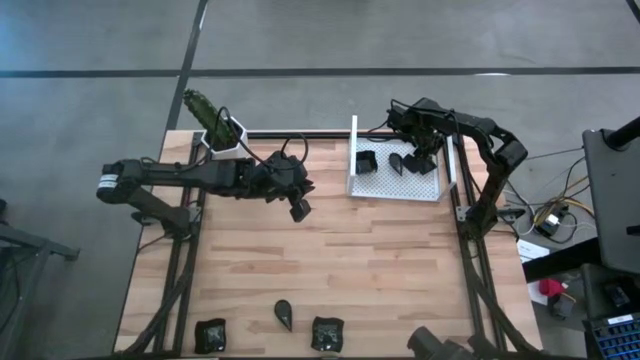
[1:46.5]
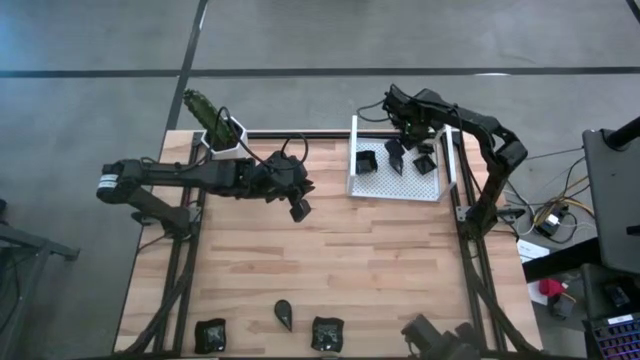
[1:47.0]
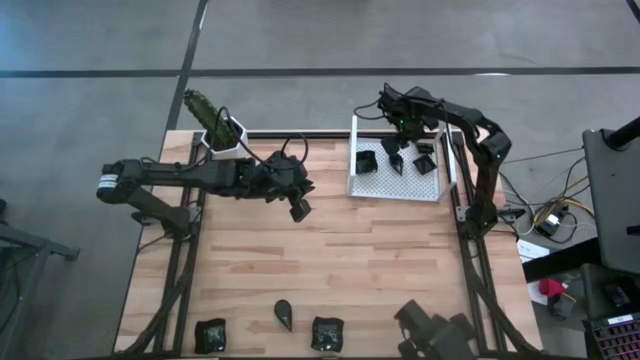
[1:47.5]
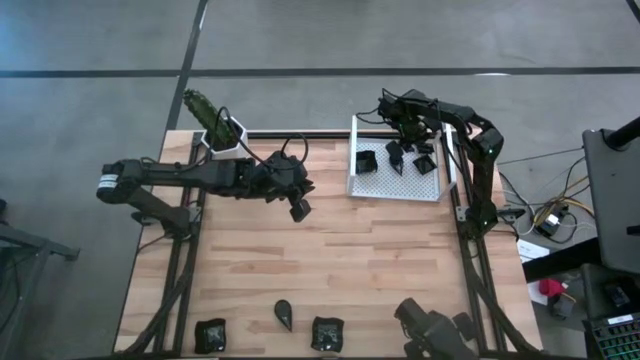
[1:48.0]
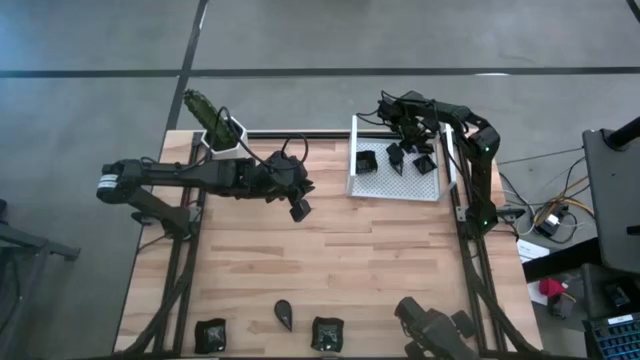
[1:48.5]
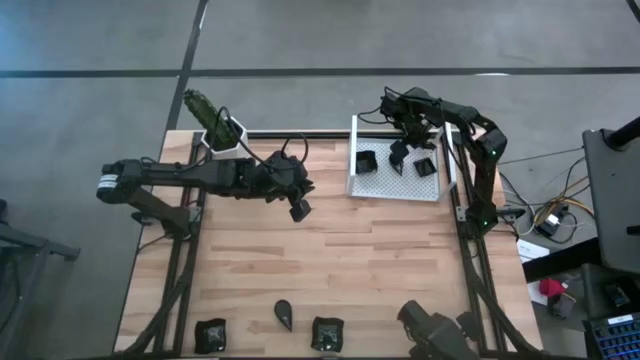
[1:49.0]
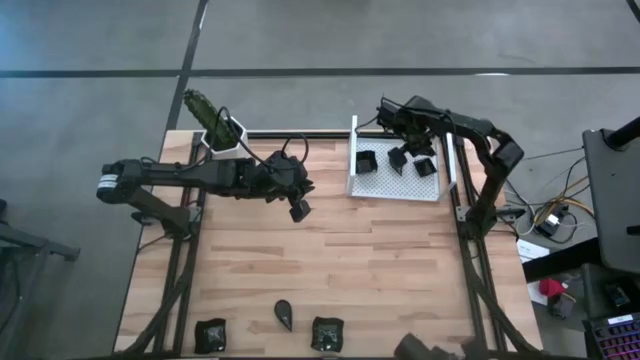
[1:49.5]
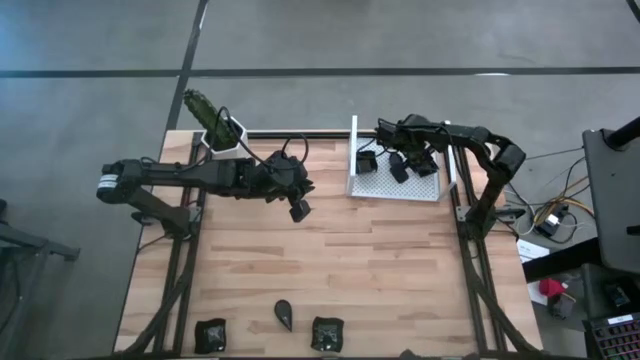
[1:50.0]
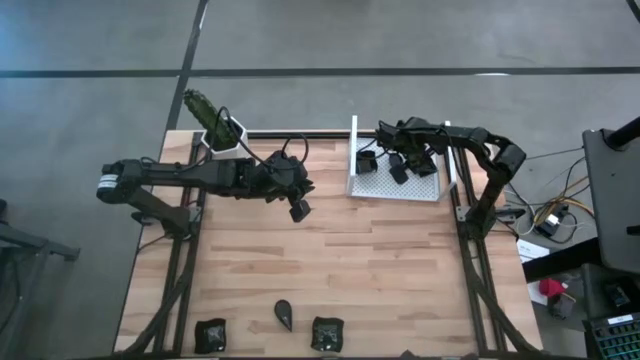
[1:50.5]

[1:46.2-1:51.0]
Task: Pick & Place Mini shaped plates
Stack the black square plate on top of the other black square plates on the shelf

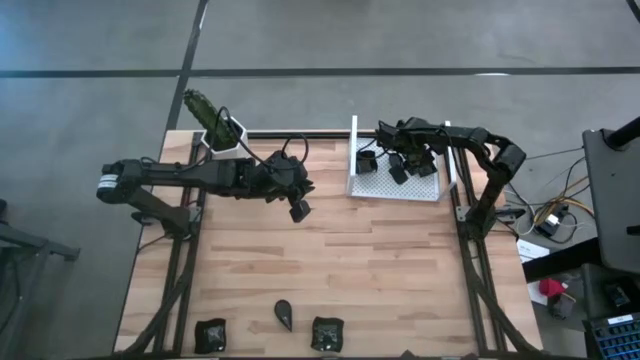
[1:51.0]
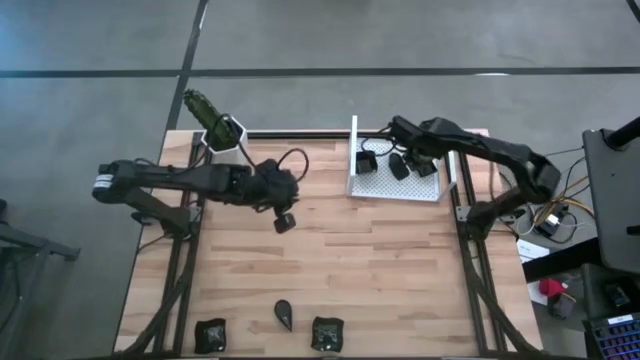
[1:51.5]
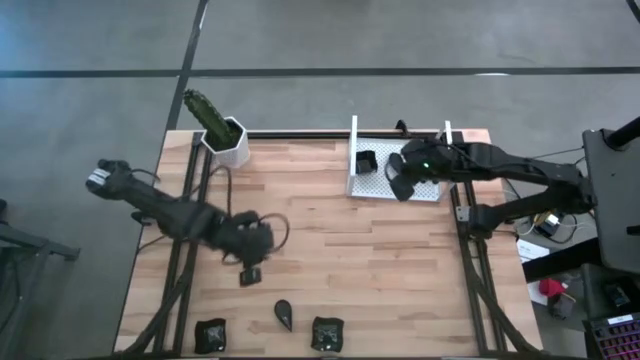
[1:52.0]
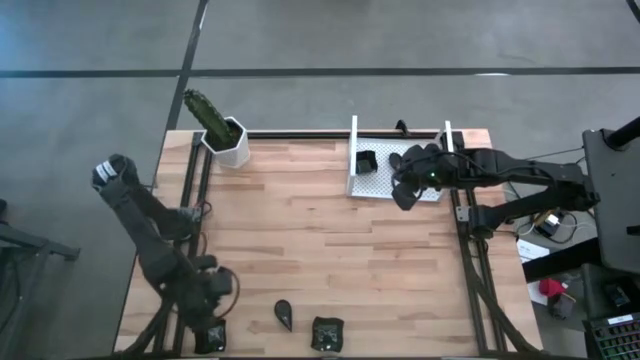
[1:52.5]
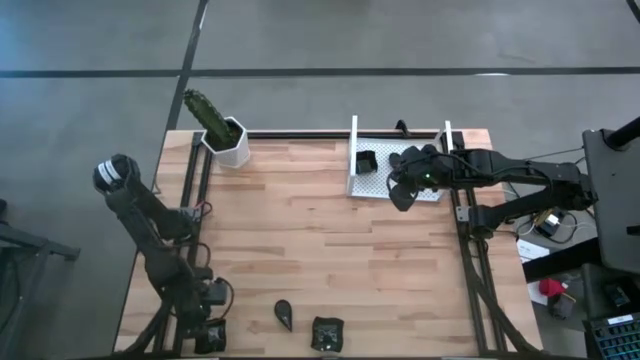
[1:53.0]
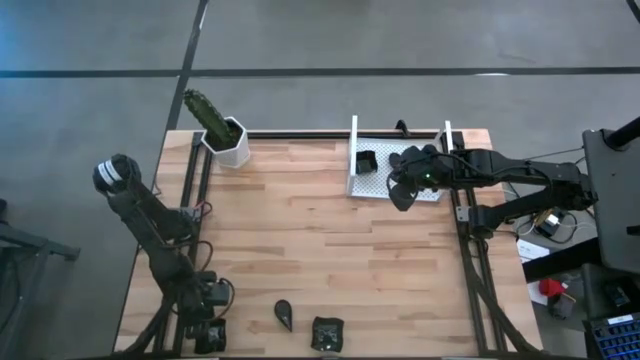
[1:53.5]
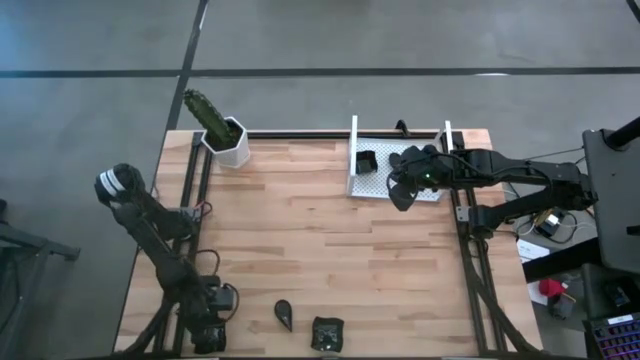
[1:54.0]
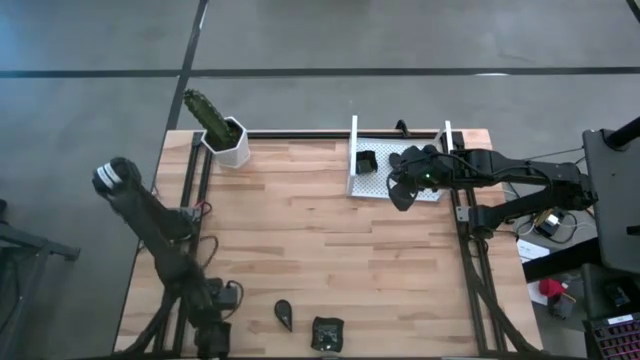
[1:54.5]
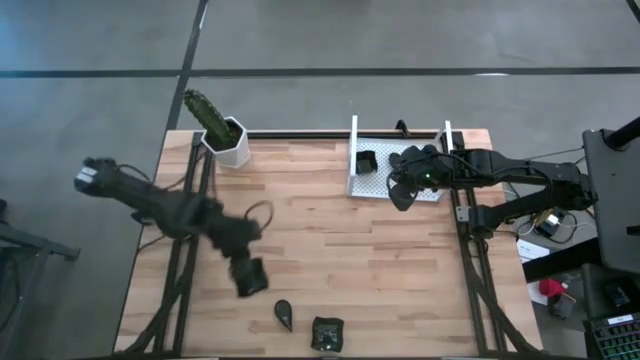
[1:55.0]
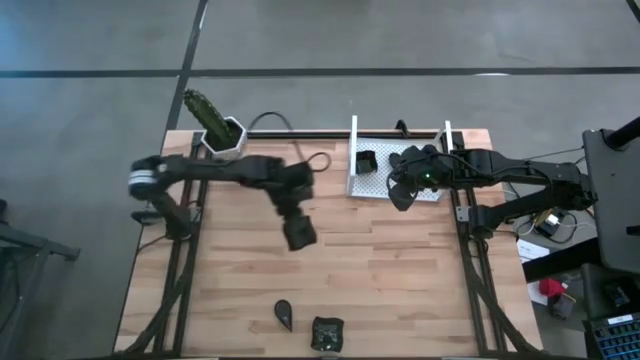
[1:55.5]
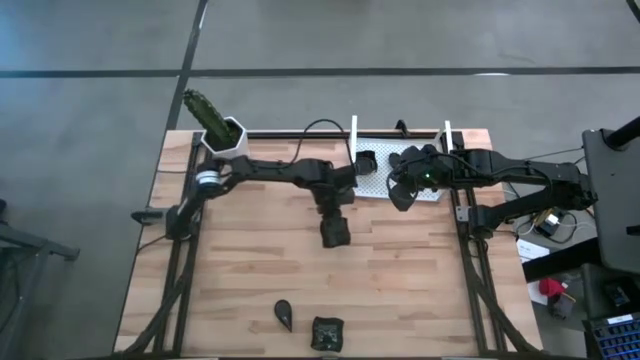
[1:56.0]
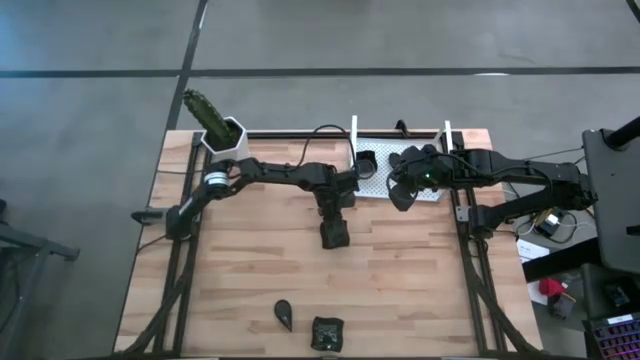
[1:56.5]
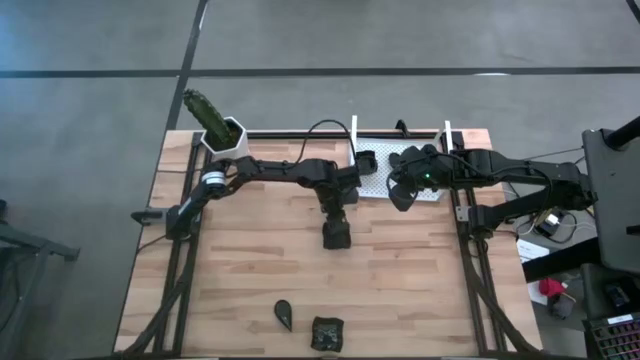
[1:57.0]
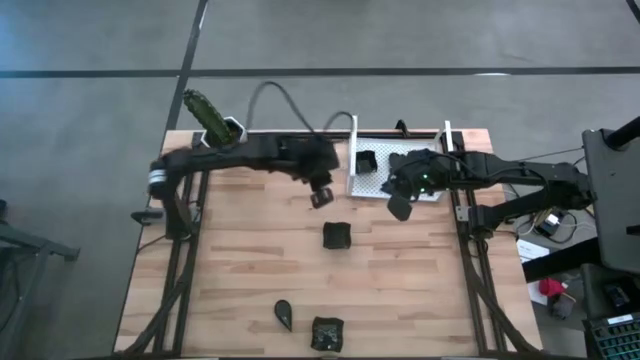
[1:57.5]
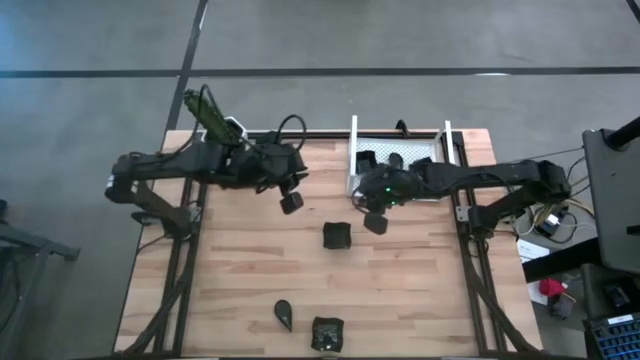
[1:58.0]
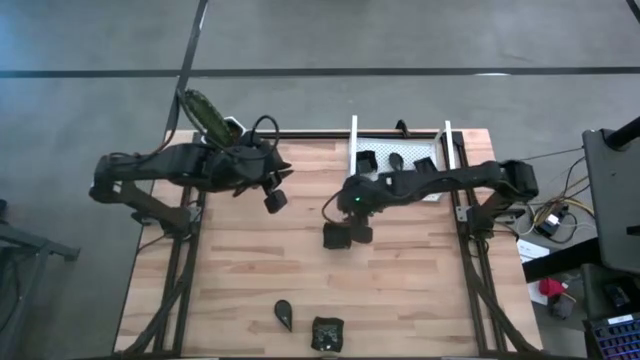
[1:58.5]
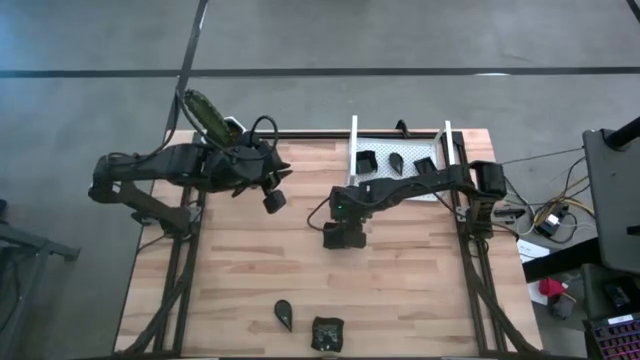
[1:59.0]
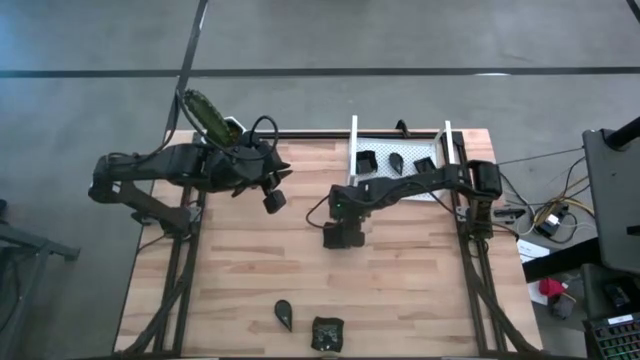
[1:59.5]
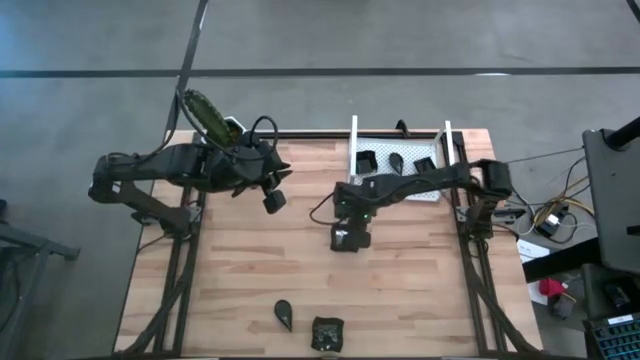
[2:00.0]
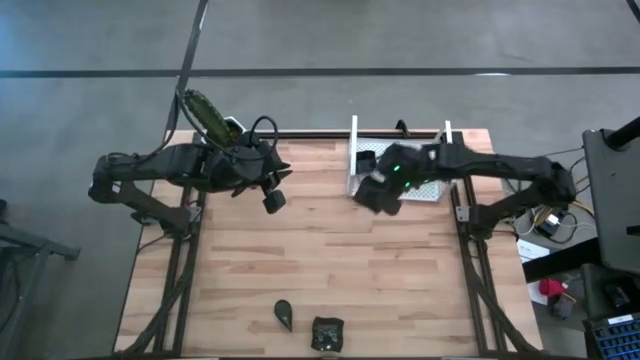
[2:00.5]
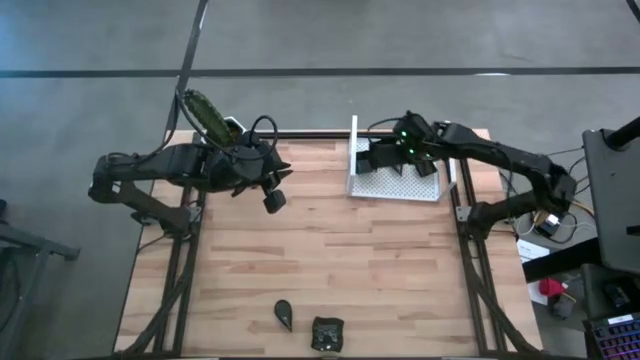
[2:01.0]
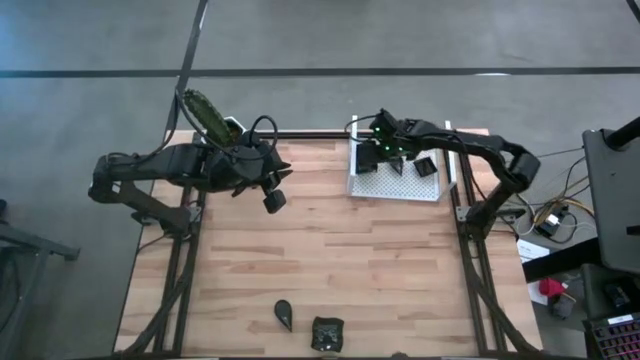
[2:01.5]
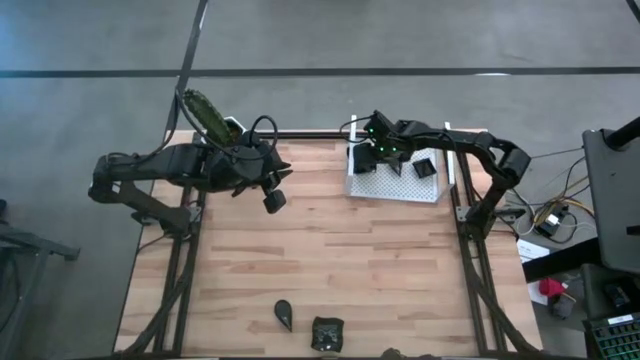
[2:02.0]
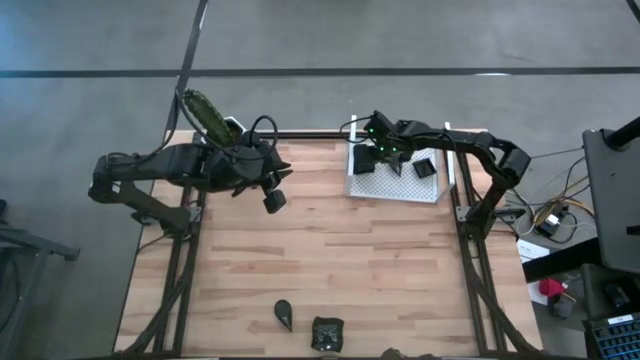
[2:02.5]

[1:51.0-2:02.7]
Stack the black distorted square plate on top of the other black distorted square plates on the shelf

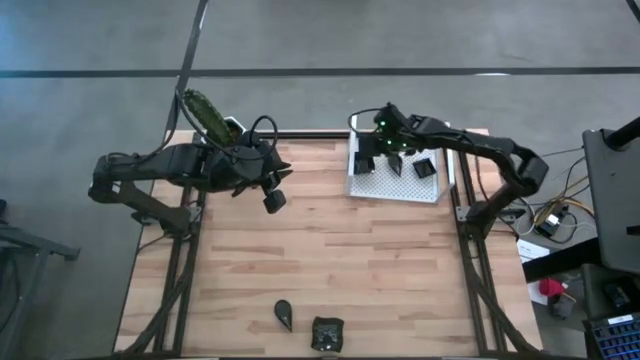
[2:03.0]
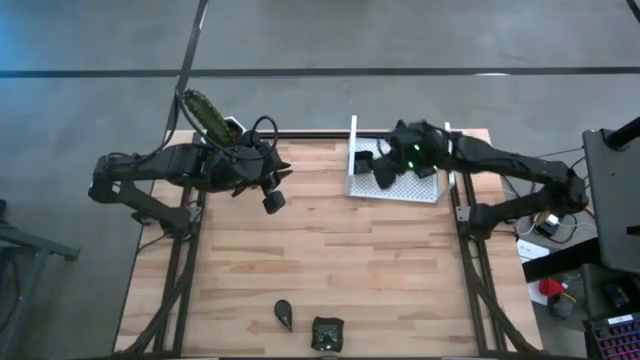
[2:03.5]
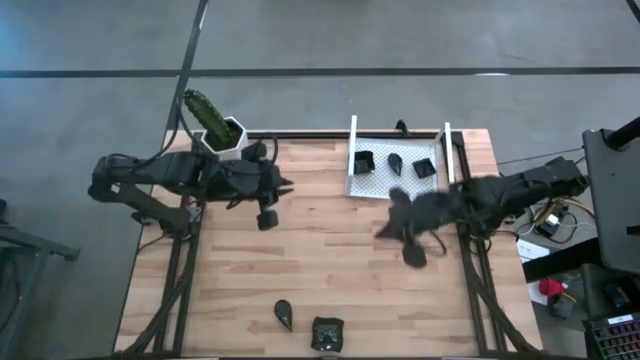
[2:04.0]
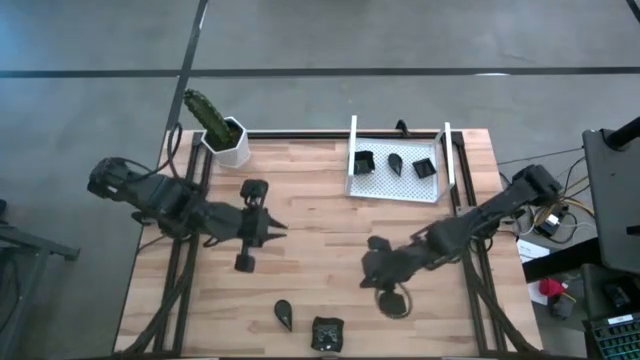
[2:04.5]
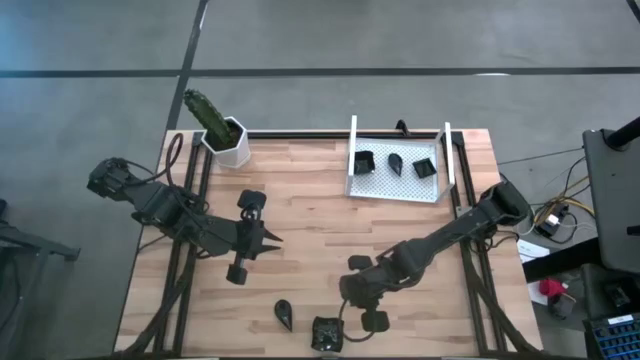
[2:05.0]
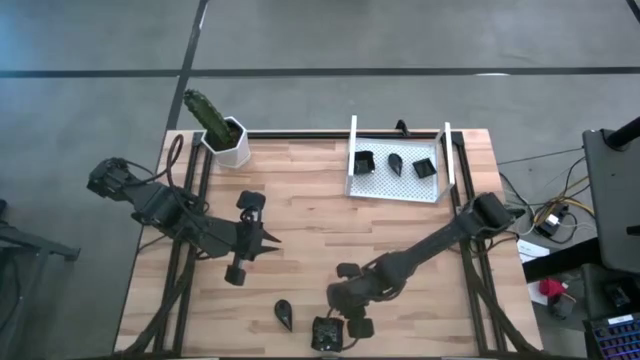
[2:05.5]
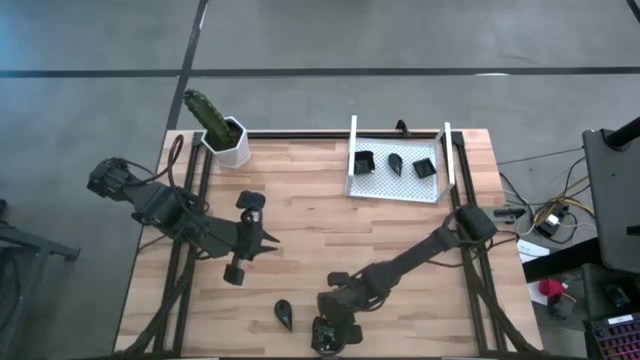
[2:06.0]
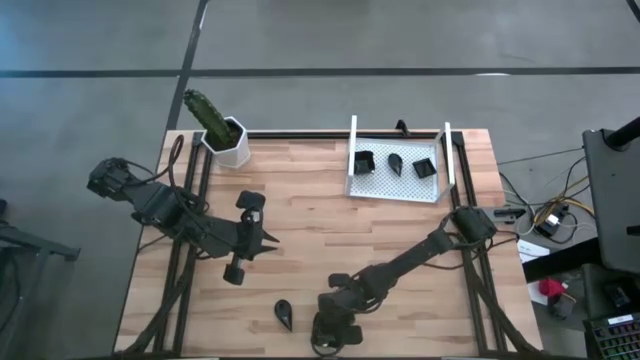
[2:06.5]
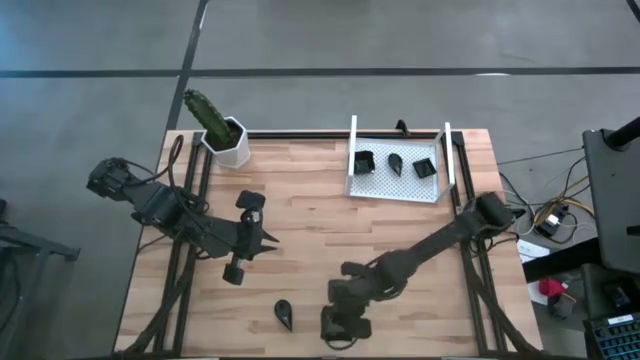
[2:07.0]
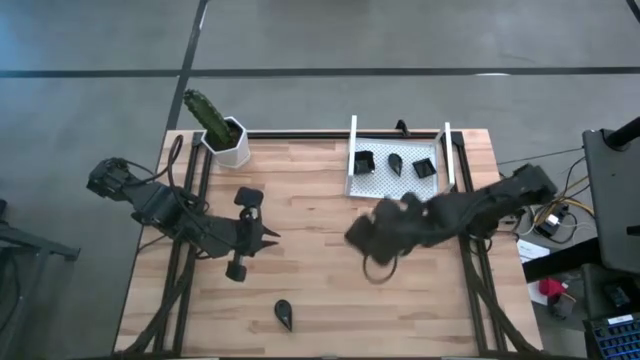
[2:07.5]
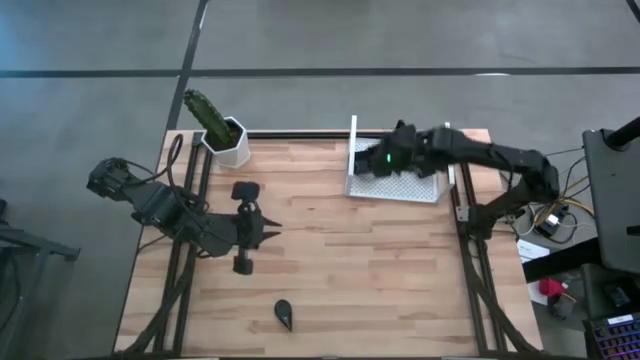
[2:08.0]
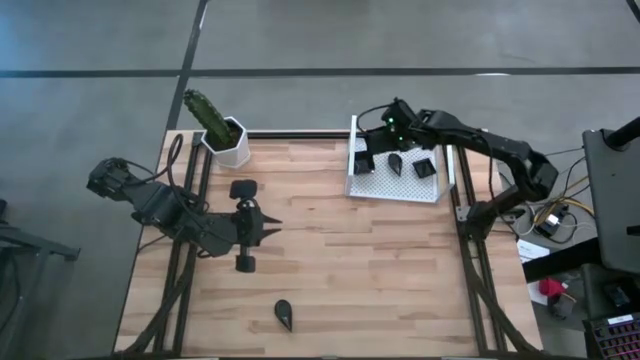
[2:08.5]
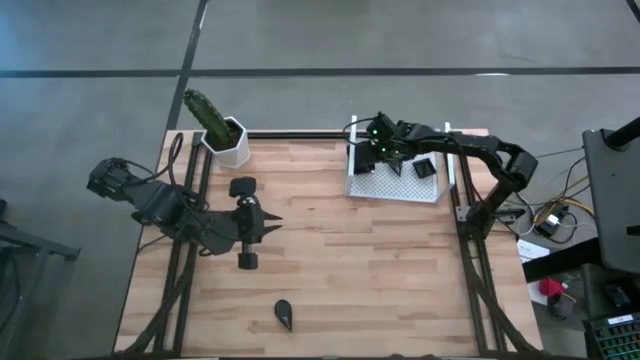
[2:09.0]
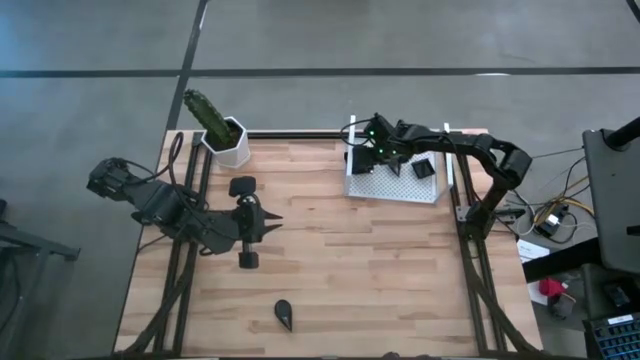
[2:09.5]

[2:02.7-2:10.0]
Stack the black distorted square plate on top of the other black distorted square plates on the shelf
